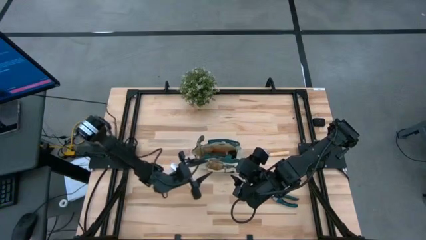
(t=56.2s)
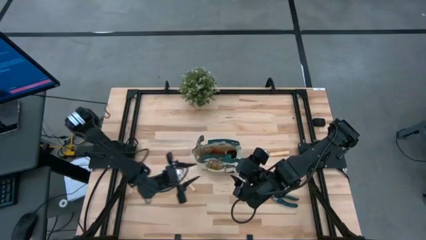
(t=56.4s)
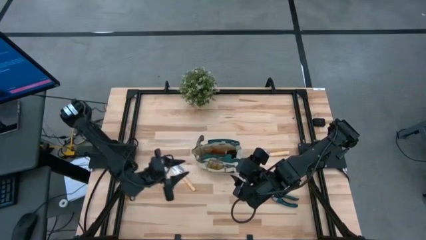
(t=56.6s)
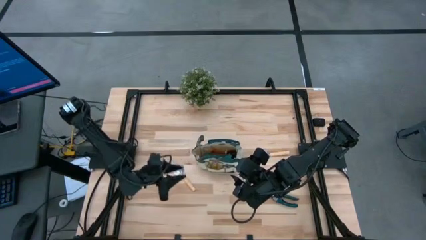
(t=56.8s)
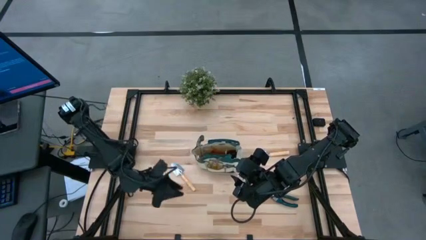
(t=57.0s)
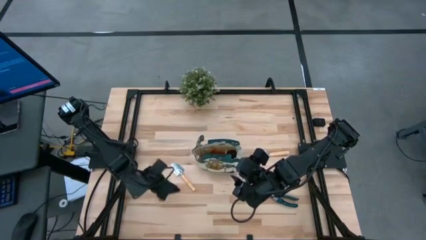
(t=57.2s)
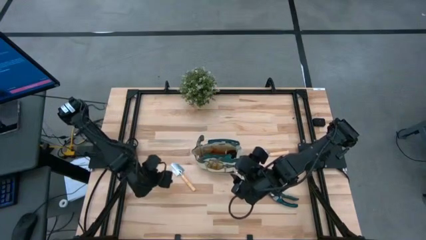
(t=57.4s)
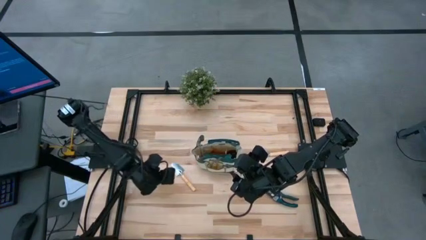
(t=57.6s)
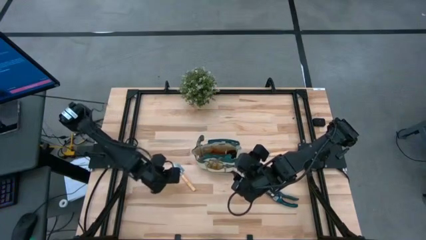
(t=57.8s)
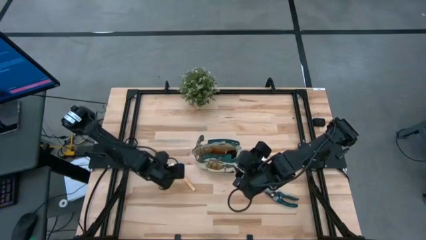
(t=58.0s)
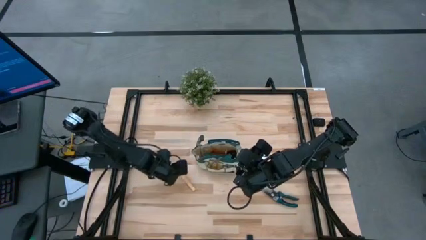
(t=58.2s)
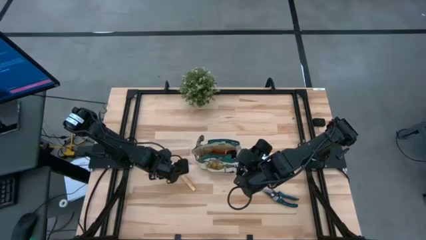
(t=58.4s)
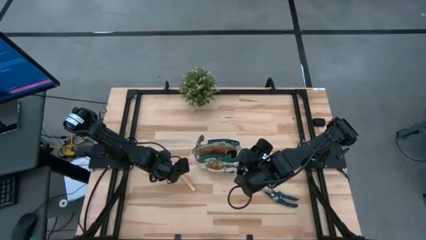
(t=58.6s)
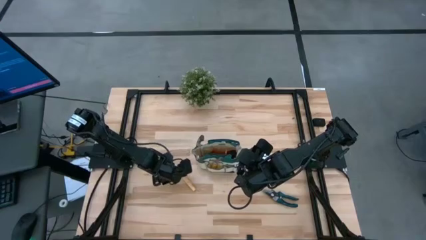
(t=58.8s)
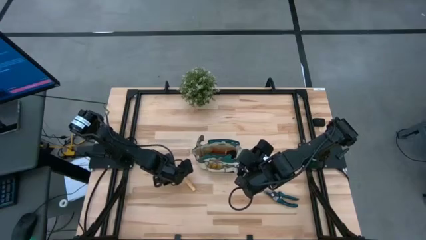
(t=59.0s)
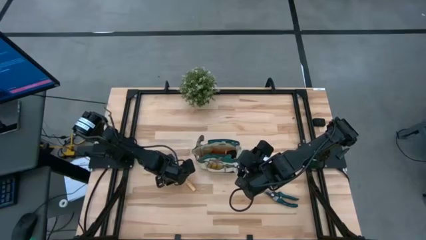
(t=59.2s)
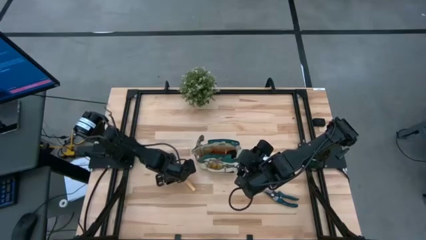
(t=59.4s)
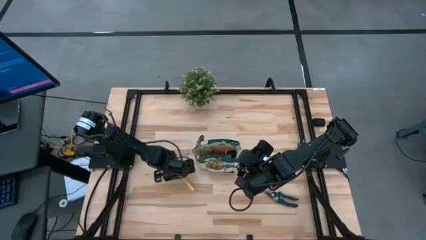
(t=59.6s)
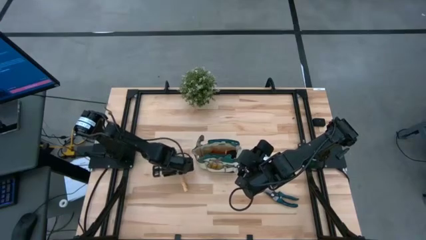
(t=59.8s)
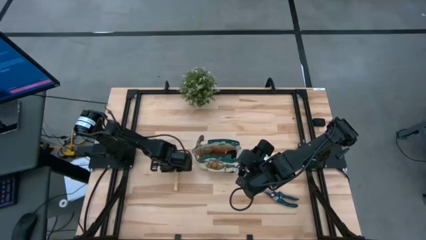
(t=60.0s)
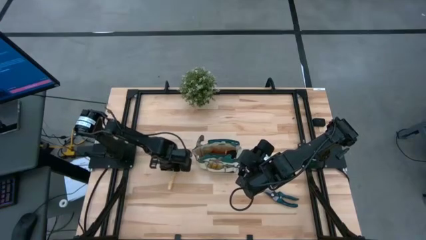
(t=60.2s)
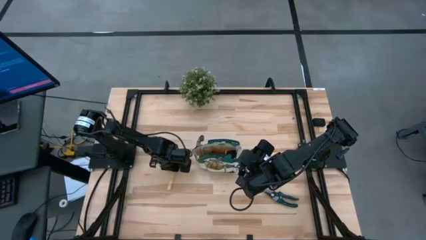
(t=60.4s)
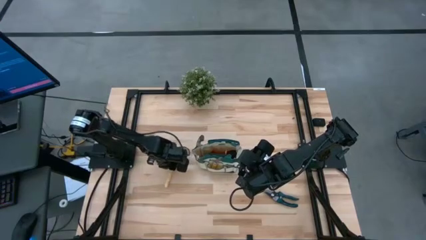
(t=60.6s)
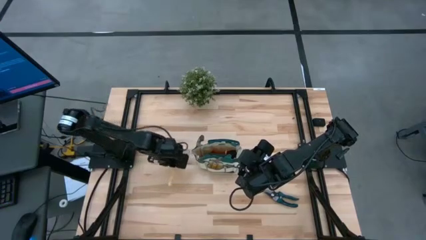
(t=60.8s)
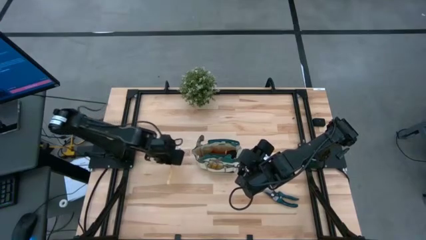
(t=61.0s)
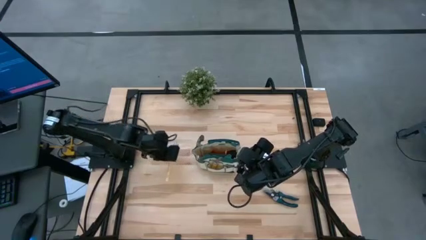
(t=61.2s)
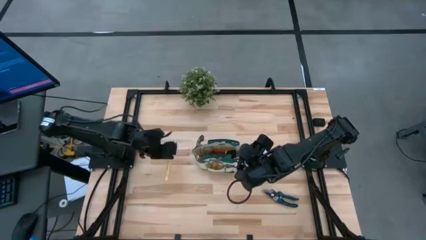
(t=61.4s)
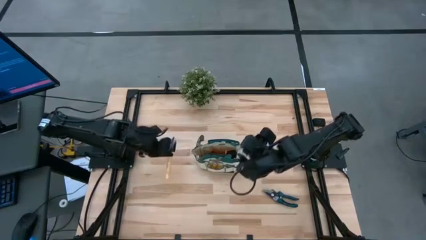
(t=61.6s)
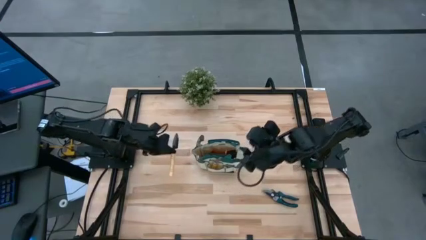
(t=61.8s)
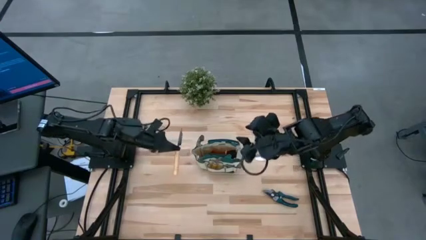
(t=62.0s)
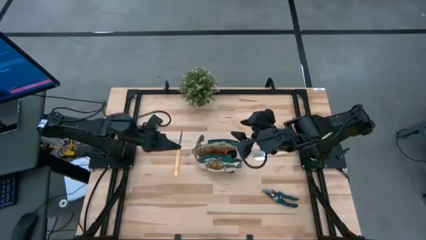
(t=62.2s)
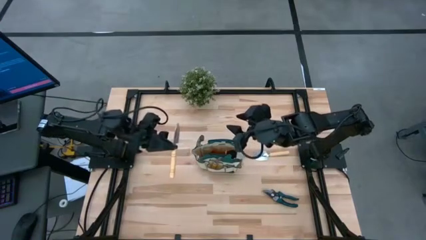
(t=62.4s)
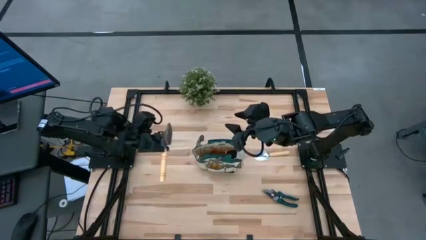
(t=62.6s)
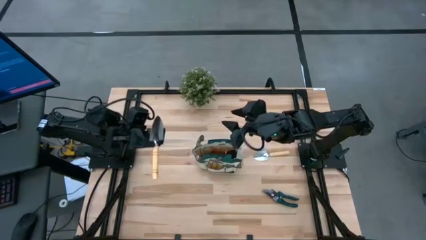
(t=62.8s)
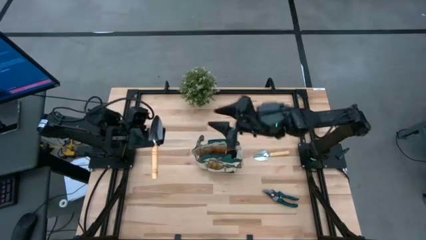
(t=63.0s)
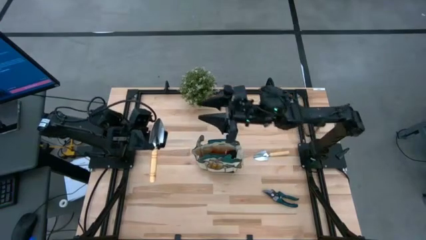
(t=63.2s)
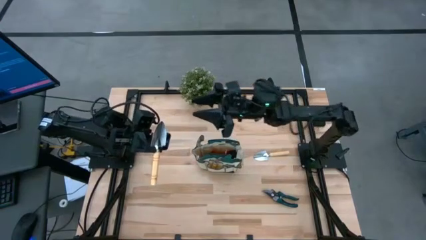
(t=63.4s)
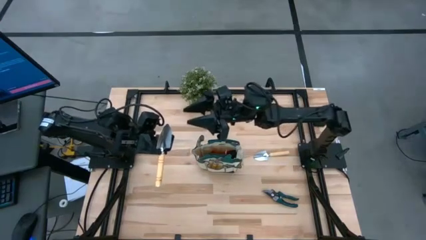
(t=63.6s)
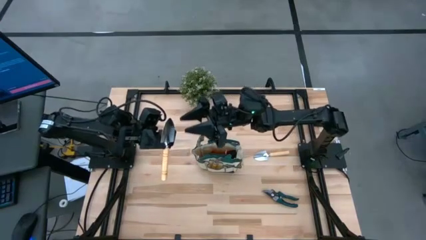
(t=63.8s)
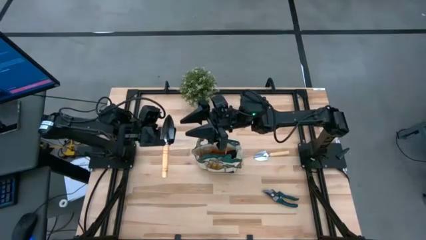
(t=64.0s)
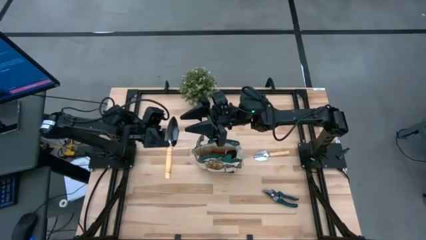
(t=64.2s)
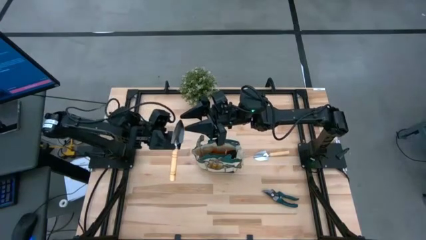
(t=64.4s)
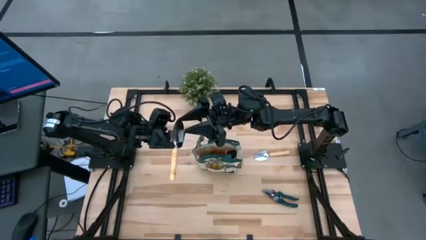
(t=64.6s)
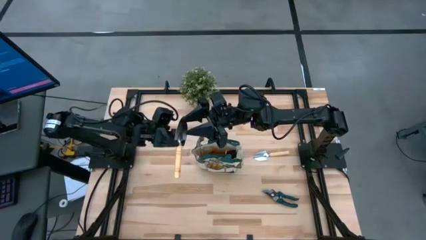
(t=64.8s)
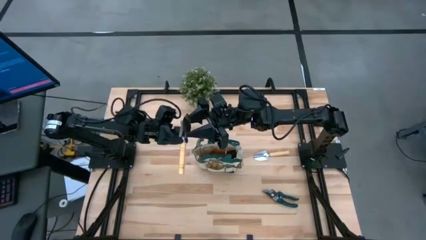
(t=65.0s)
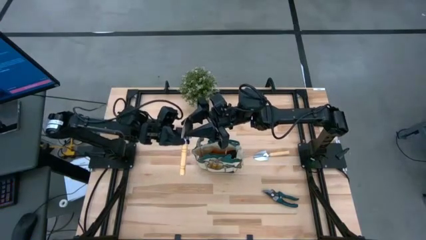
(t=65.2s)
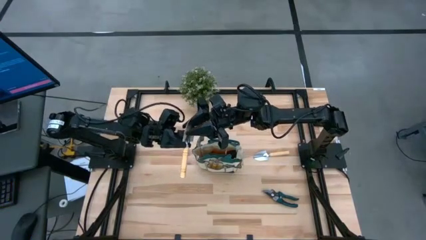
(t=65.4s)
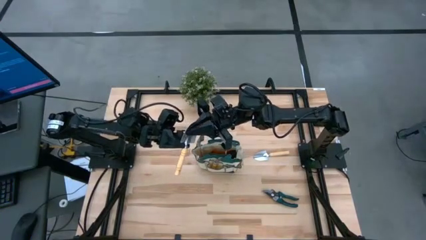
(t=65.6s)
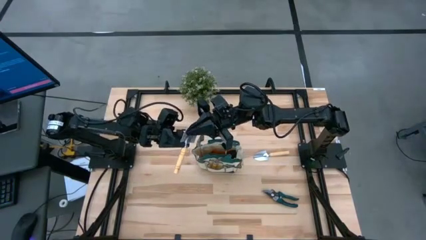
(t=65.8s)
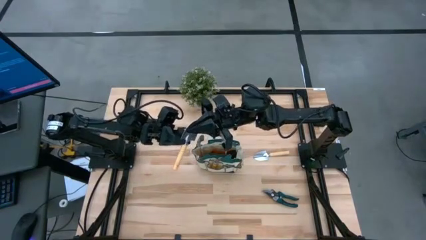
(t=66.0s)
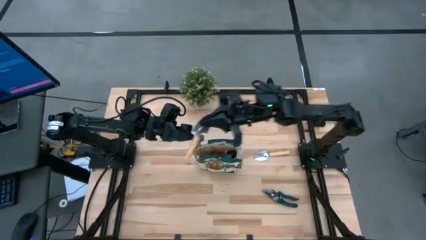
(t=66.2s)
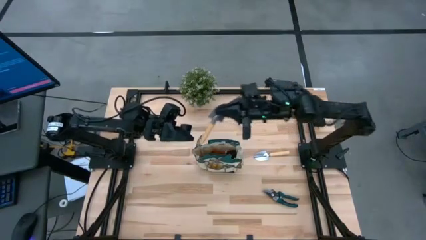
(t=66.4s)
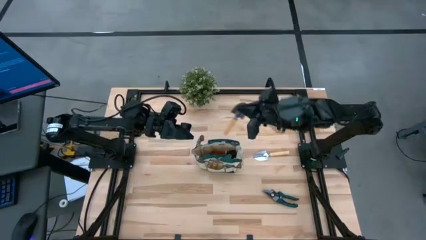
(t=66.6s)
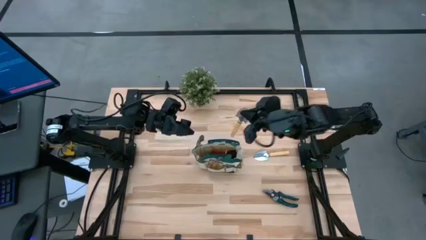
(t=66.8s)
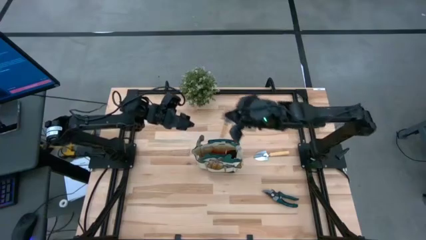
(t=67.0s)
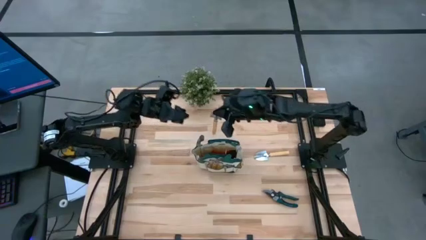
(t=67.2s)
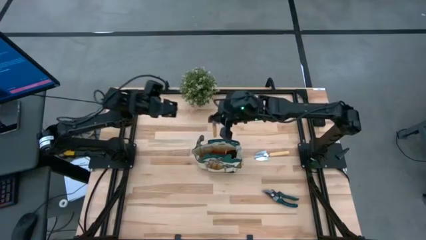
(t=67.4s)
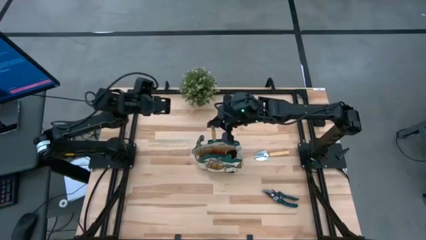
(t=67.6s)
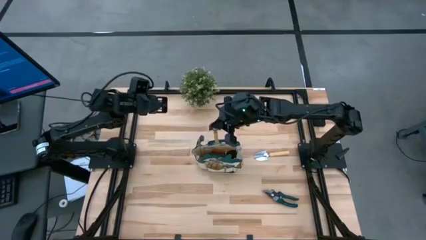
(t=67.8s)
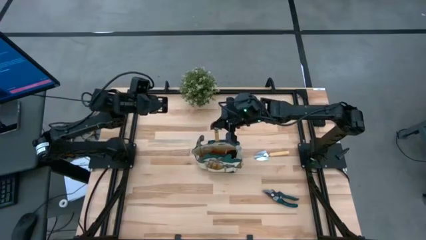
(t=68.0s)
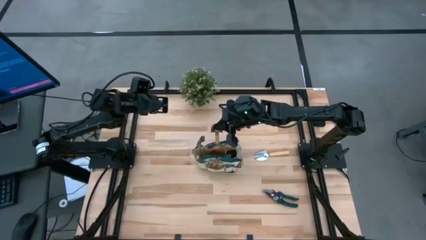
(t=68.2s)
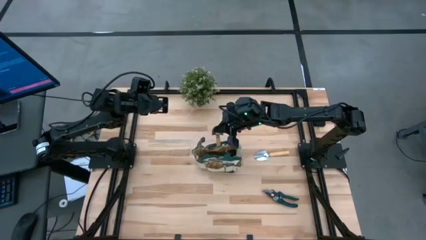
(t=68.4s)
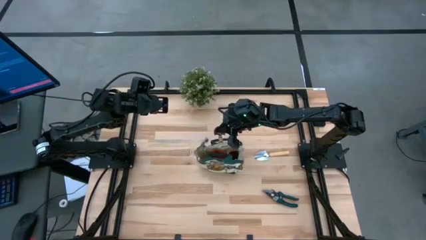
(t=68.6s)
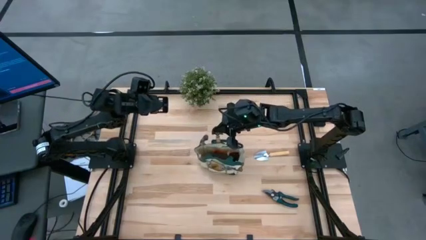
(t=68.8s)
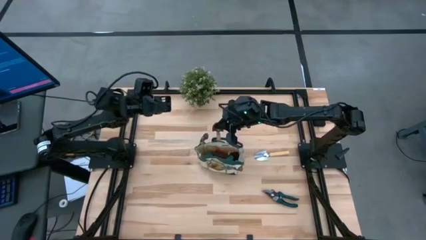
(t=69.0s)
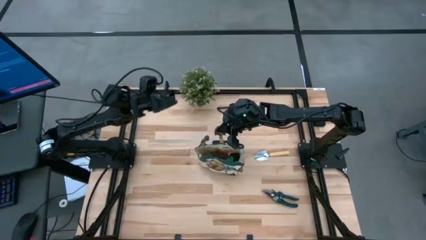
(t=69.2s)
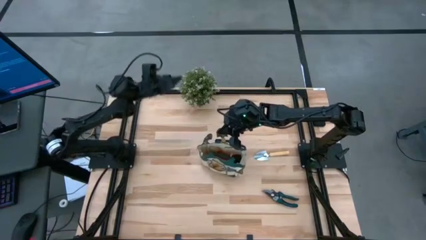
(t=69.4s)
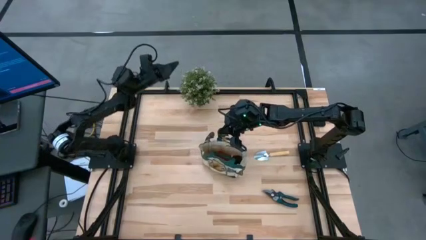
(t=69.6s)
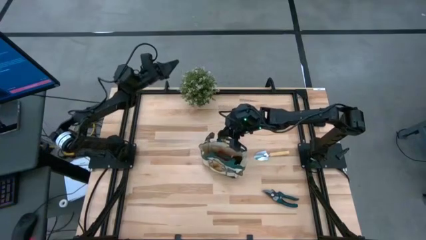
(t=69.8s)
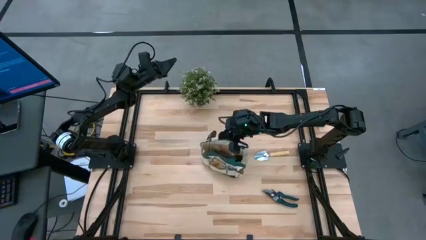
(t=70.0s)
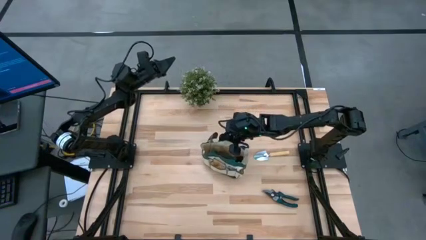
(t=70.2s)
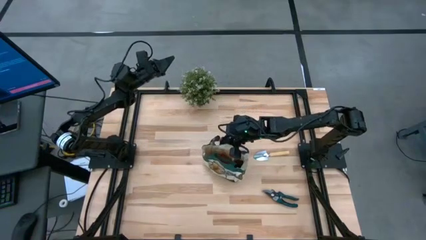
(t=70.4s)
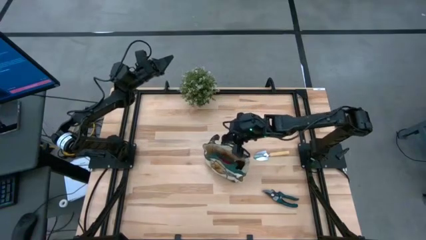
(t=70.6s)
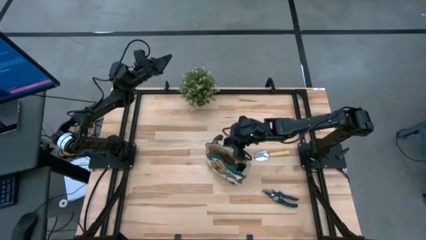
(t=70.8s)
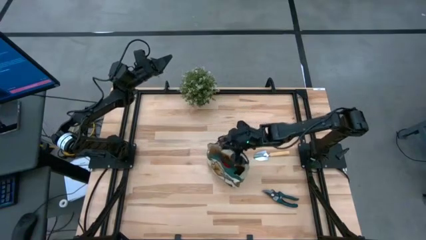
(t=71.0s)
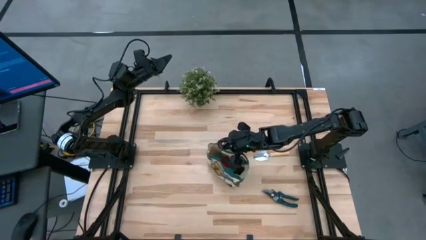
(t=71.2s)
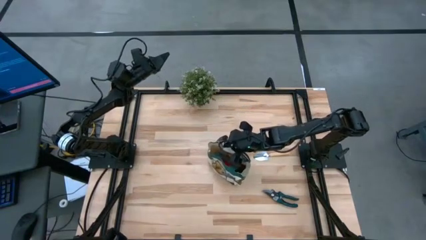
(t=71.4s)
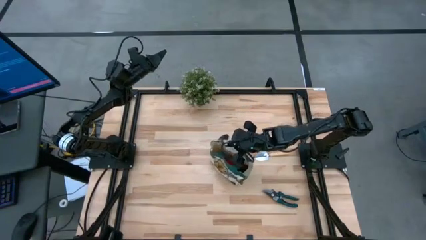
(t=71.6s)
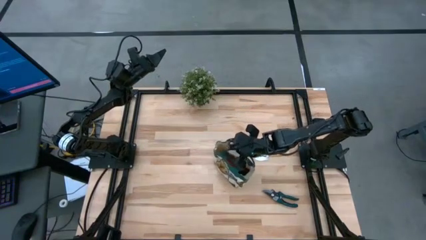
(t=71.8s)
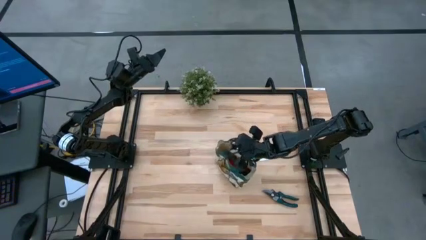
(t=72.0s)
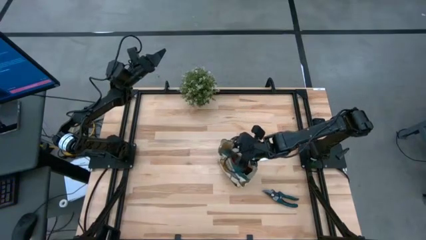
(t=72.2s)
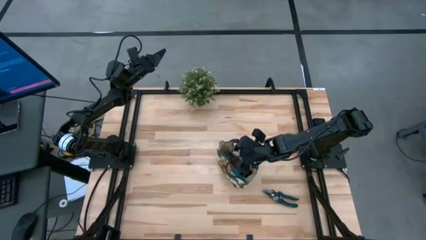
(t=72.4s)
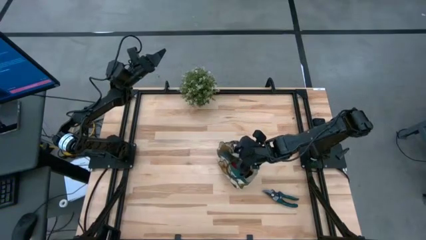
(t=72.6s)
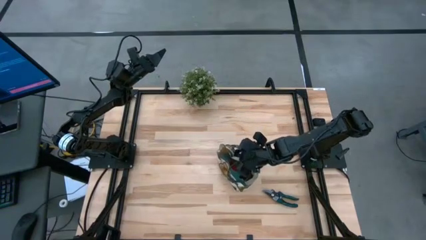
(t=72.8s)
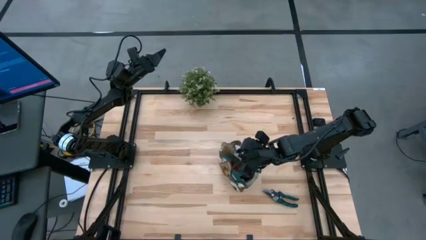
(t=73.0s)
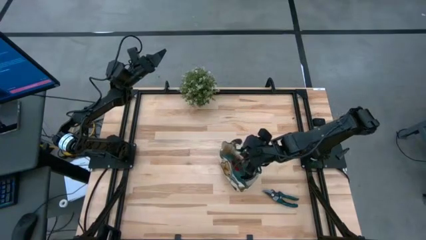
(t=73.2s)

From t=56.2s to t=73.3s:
Task: Pick & Place Garden tools in Gardening bag
Put the brown trowel into the white gardening bag
